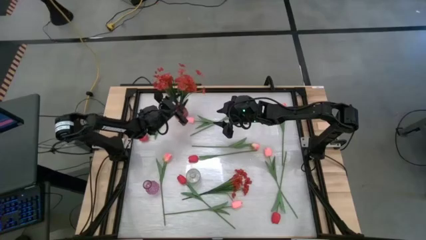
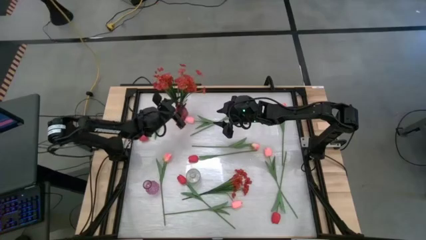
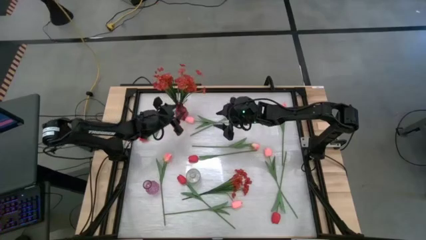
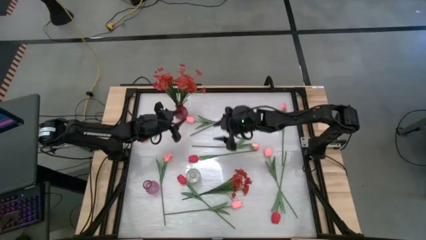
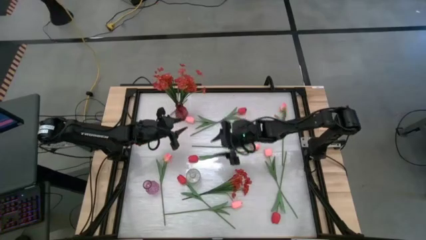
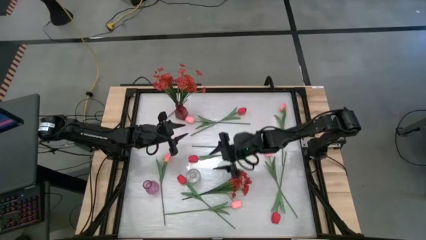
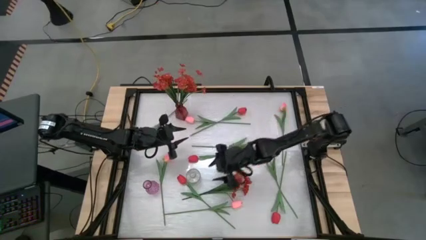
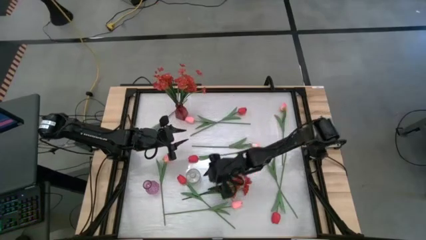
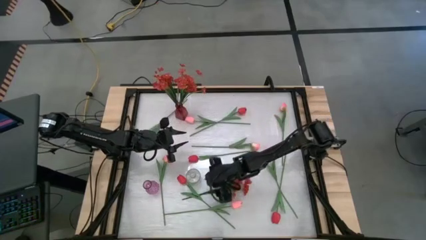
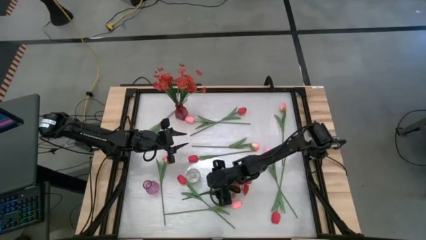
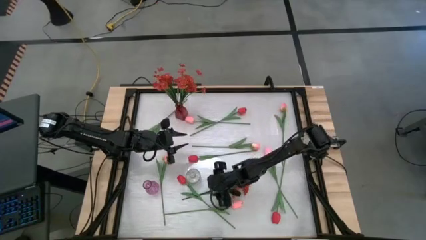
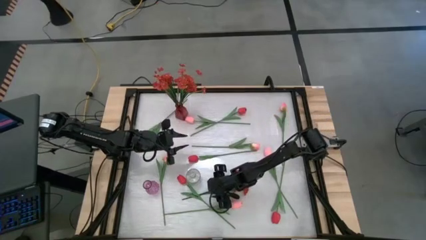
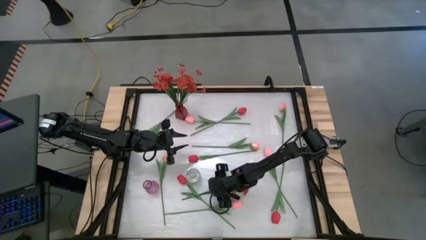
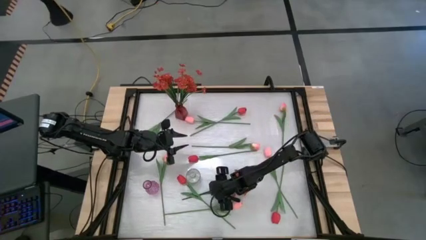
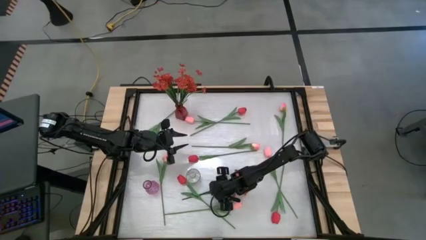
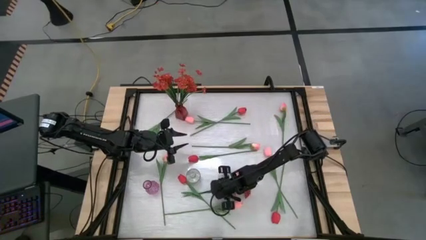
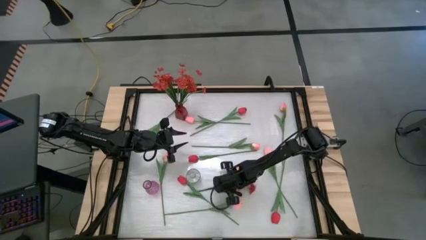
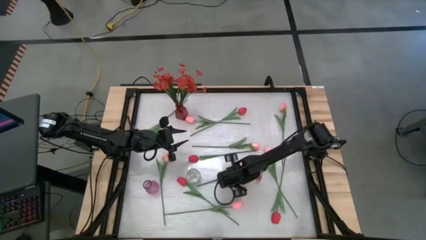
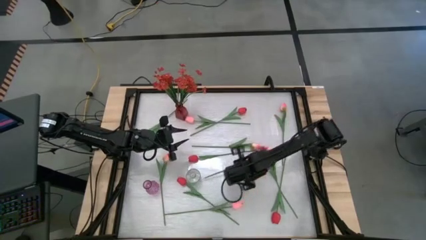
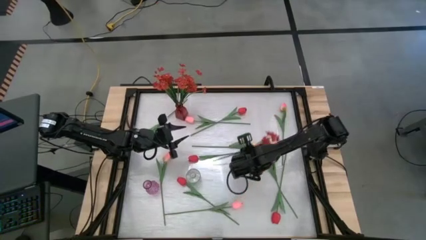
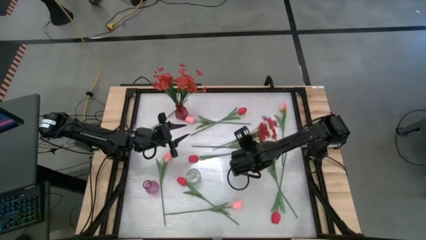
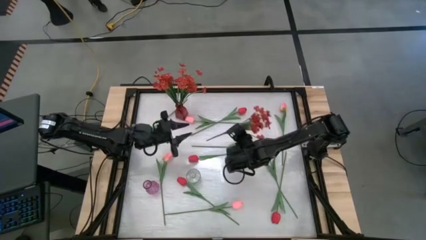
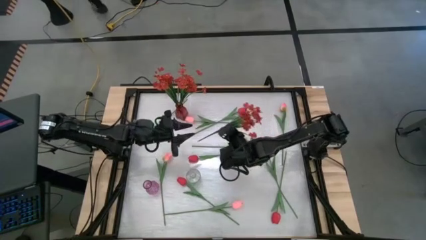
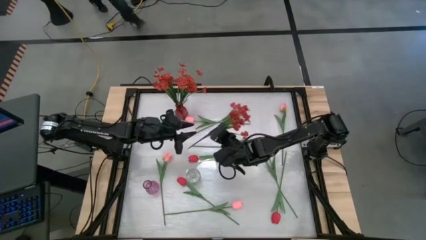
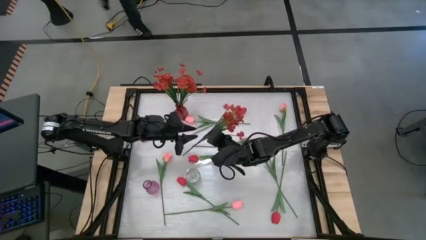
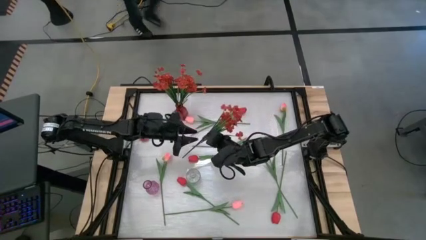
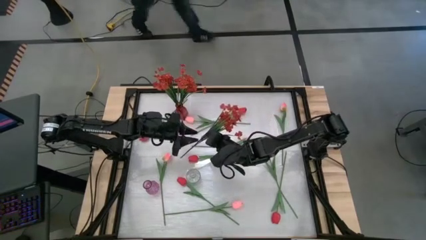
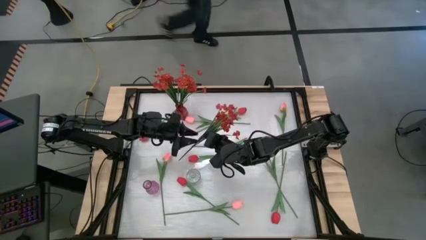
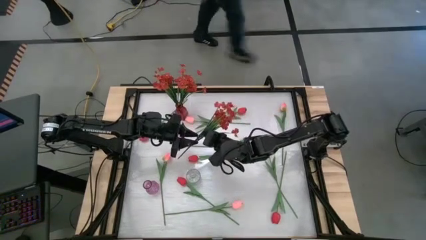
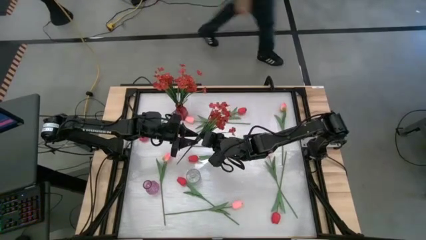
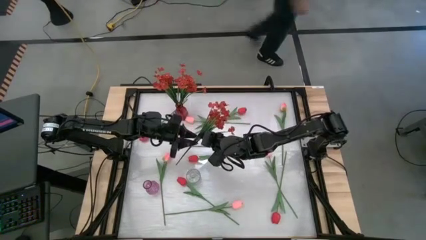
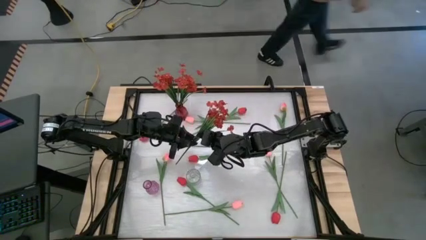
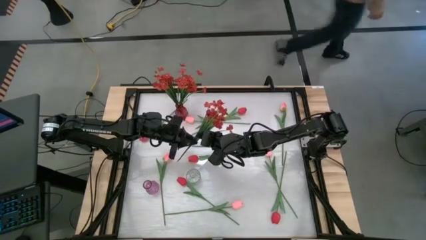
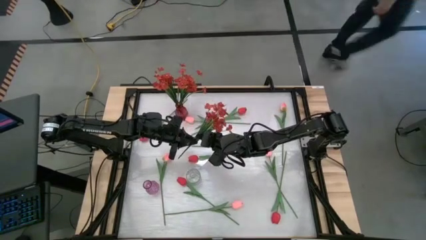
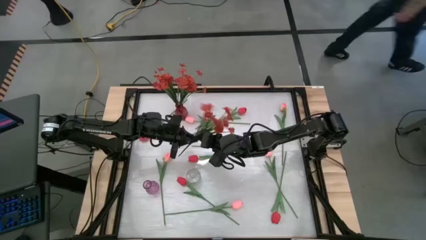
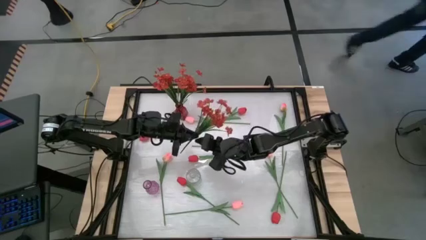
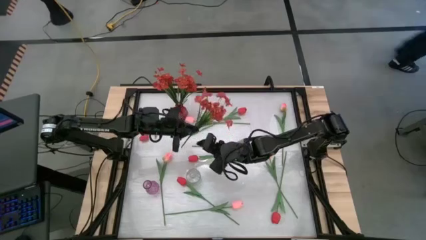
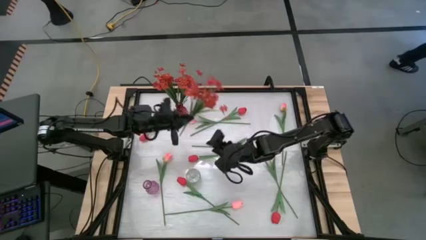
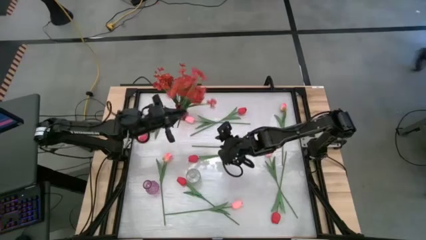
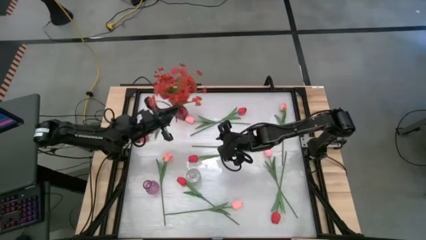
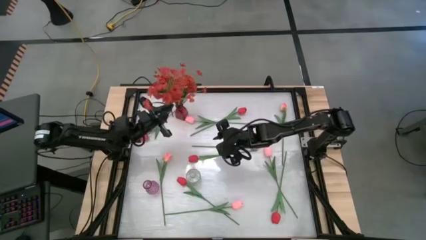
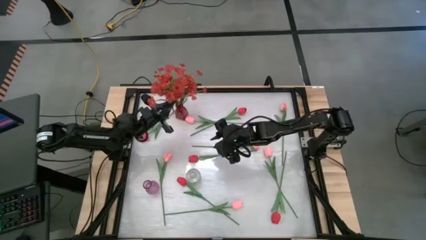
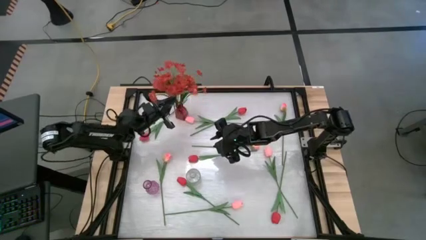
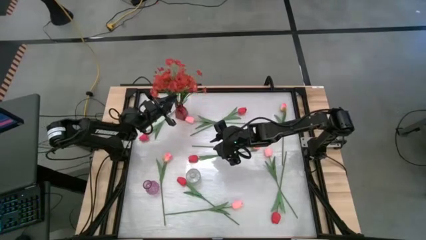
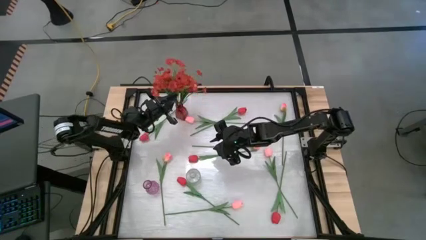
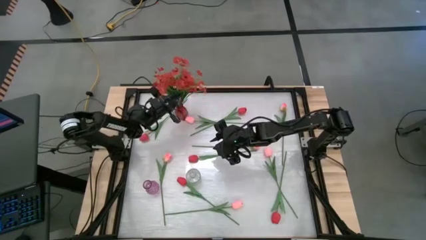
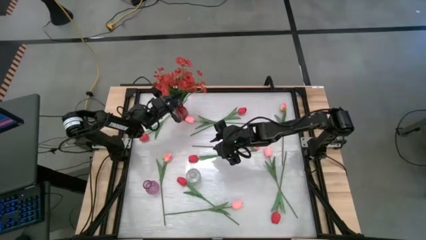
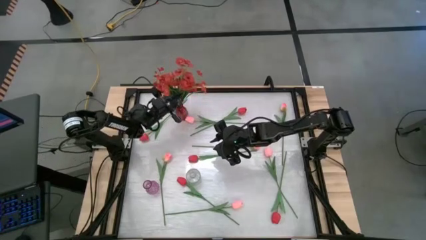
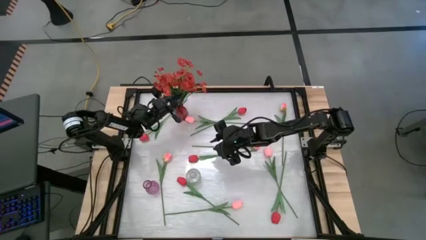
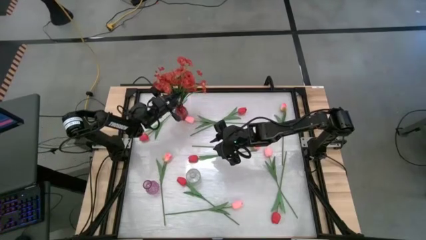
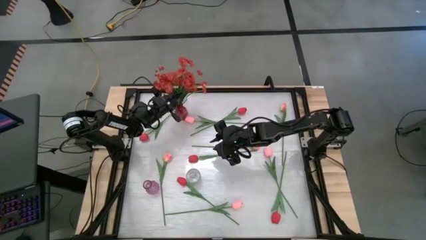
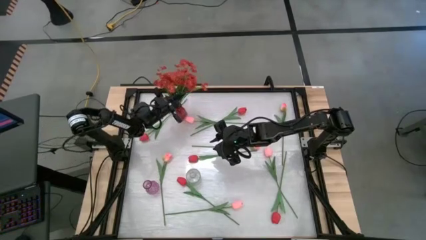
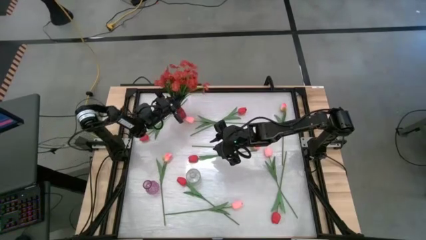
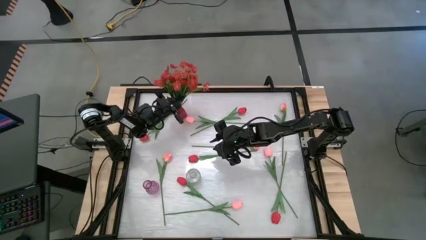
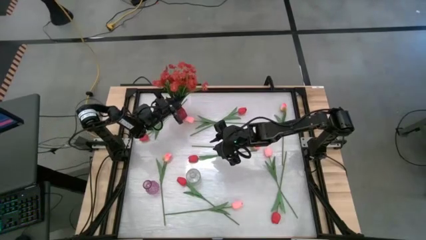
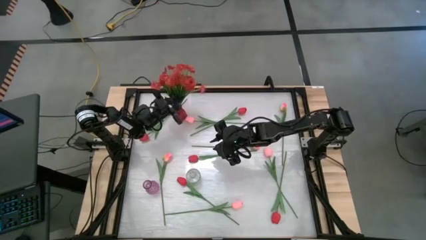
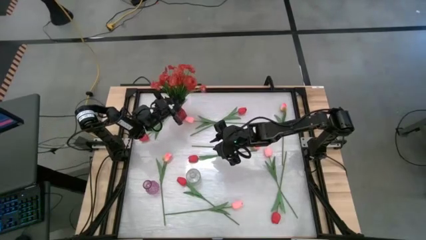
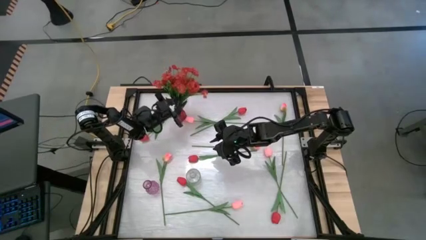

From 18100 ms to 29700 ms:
Task: Sort flowers into vase by color
Put the orange flowers into the red vase
